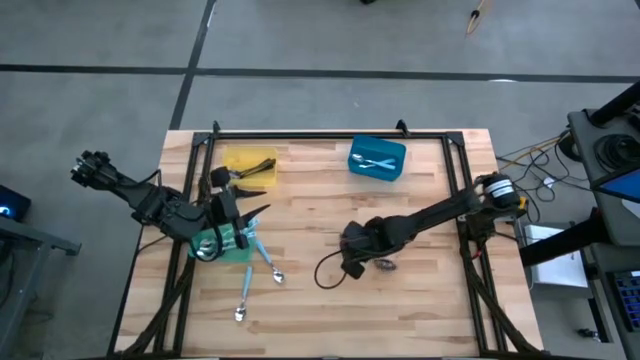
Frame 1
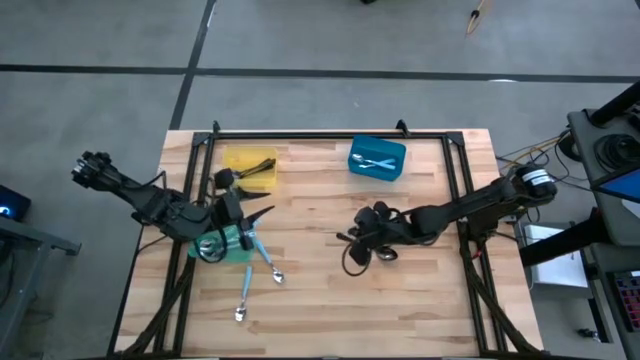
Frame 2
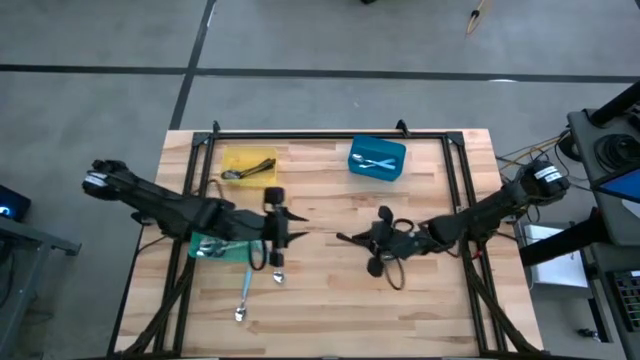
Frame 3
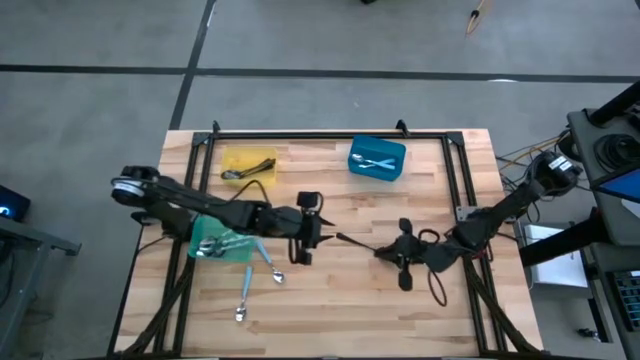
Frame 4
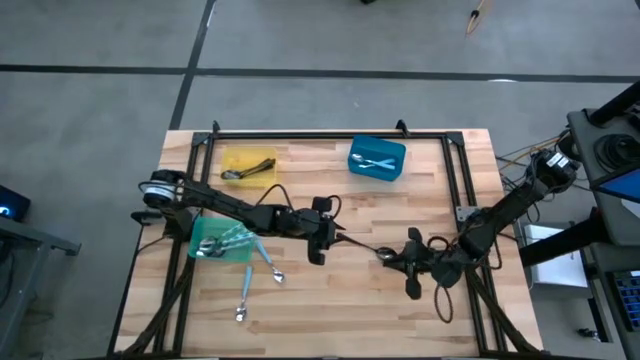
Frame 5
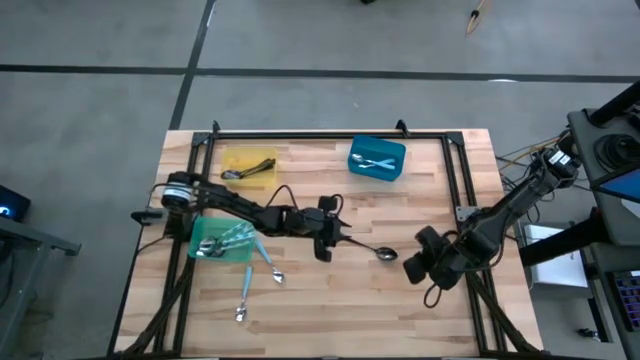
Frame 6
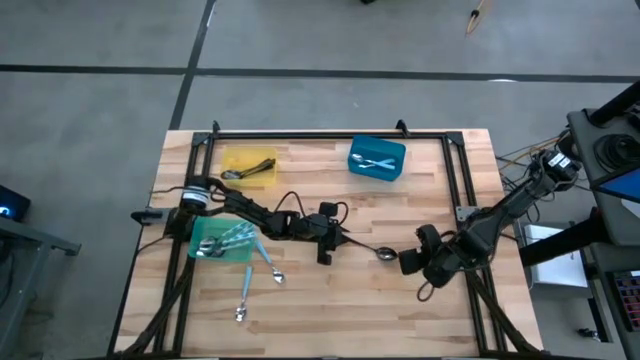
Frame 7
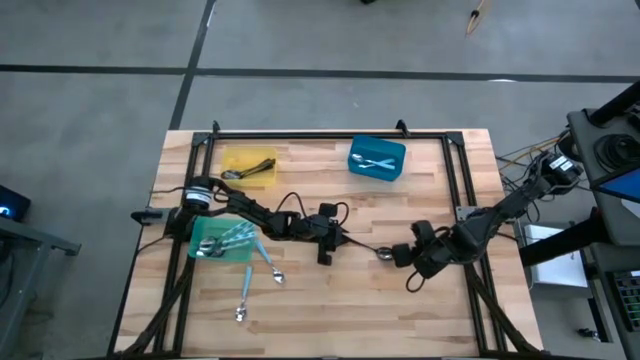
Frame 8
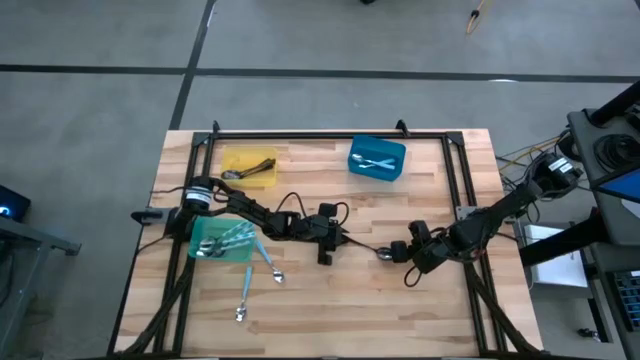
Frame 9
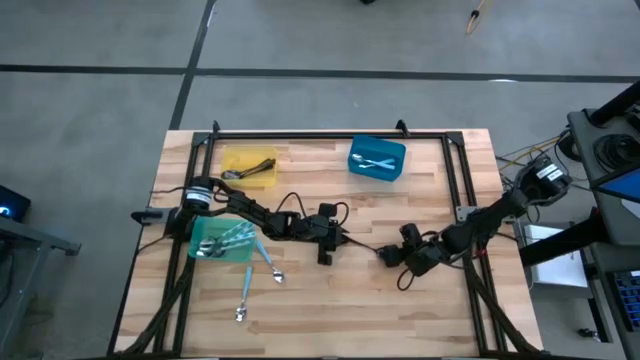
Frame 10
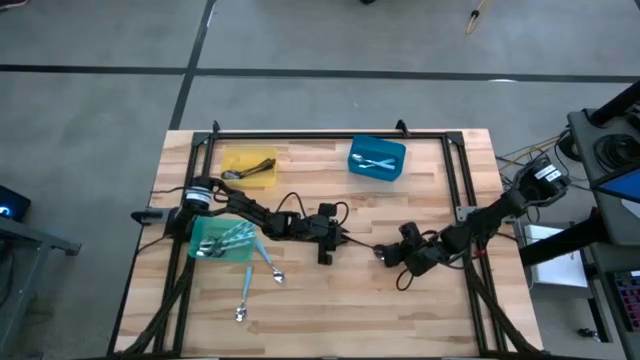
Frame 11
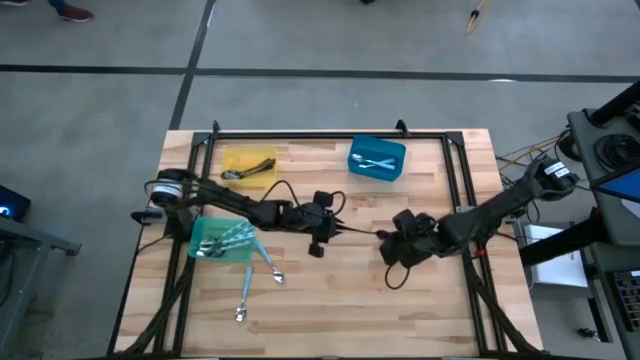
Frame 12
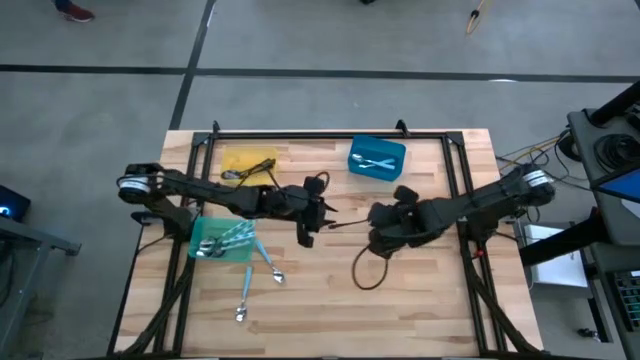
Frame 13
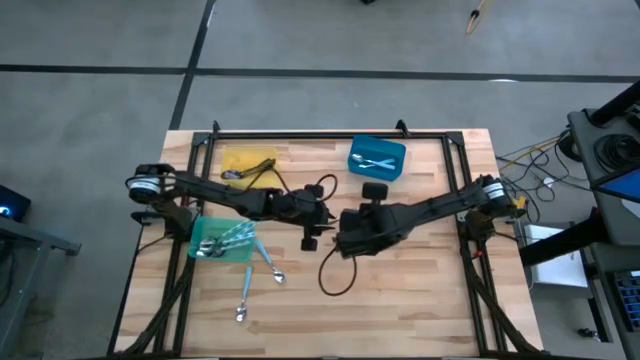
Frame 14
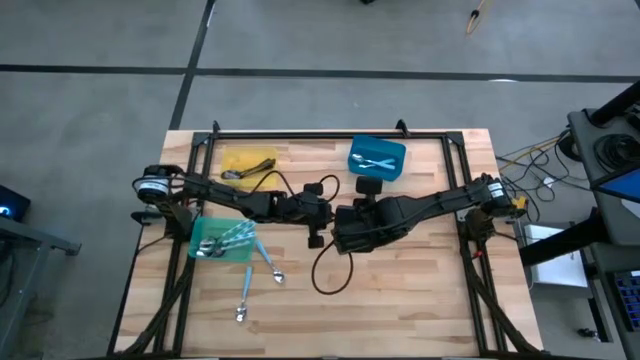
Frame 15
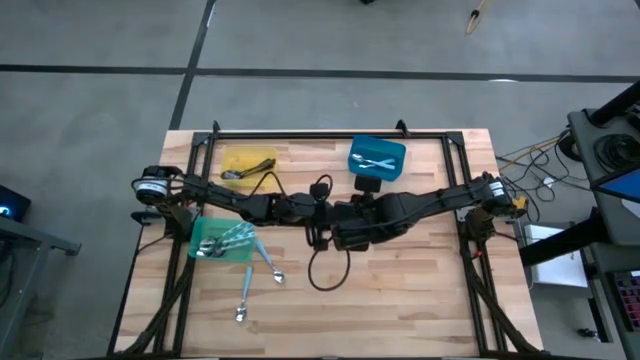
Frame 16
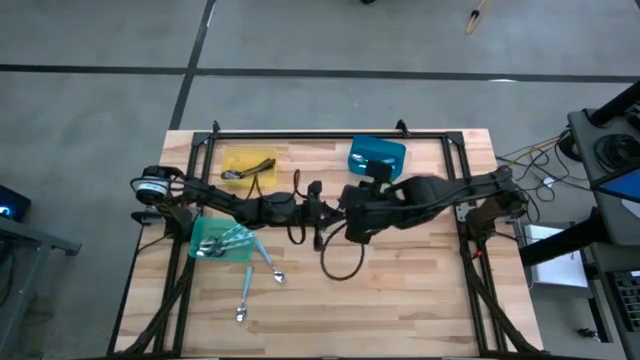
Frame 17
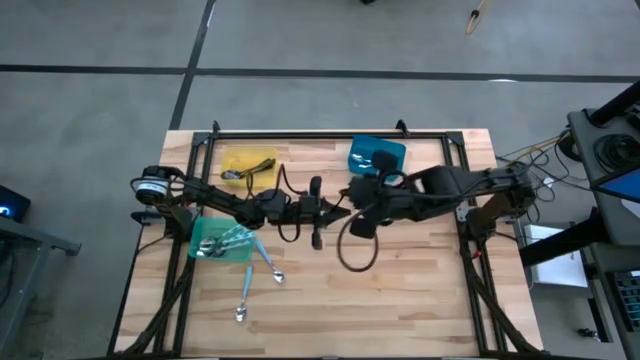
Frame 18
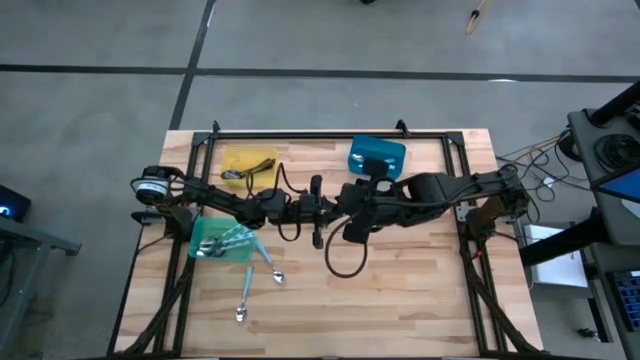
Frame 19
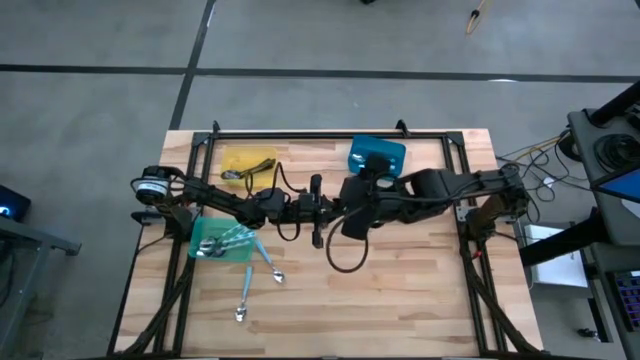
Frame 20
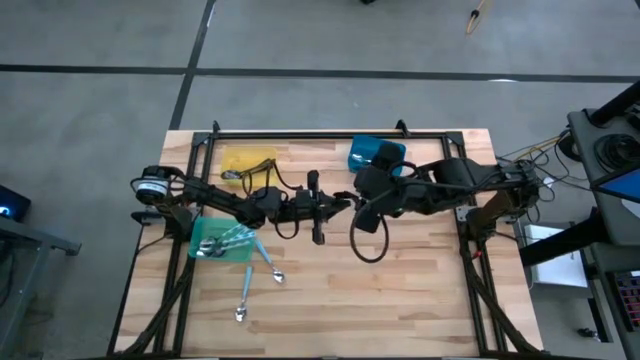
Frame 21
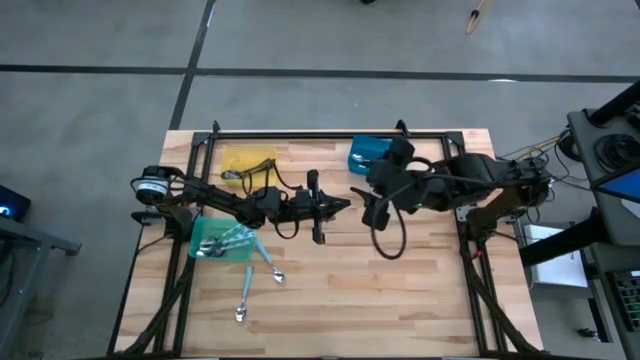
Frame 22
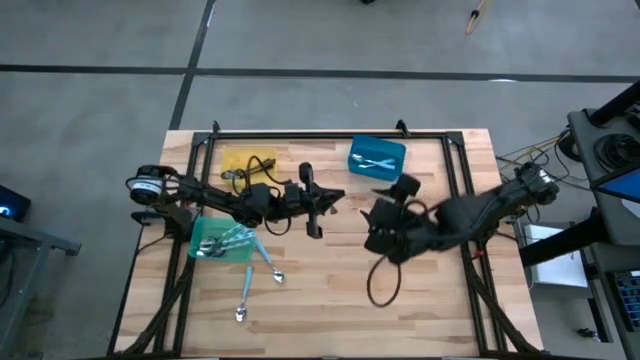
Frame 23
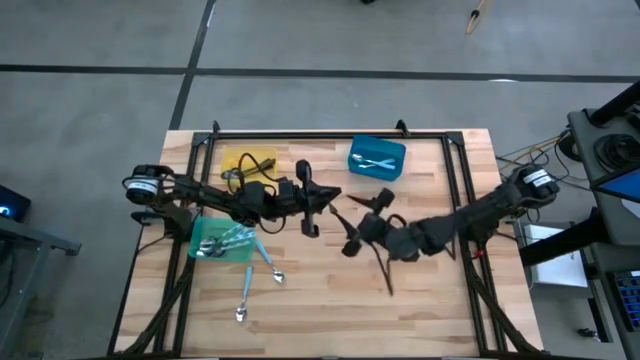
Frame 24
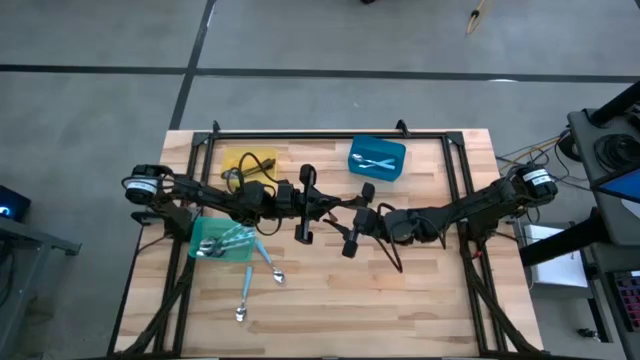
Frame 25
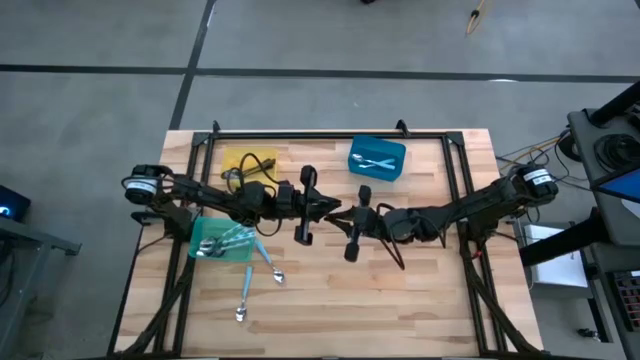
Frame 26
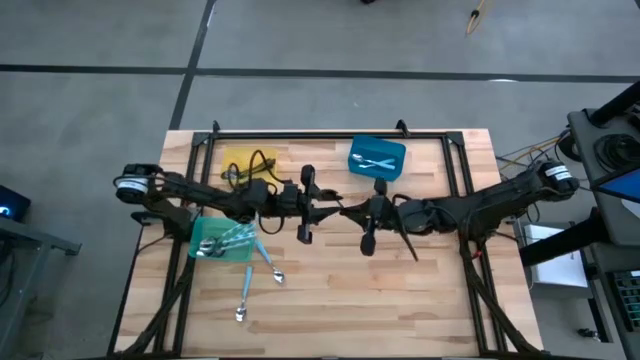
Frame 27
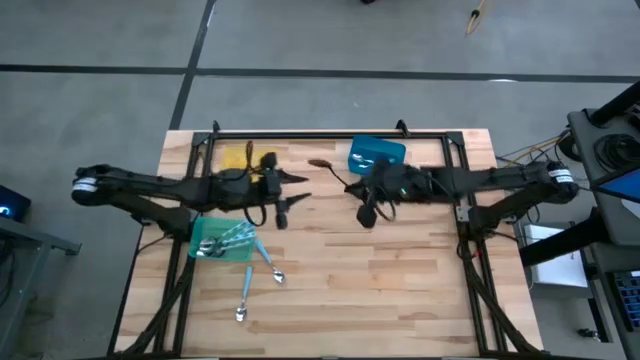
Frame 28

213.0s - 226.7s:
Task: Sort silverware by color (type)
Put the black spoon into the yellow bin

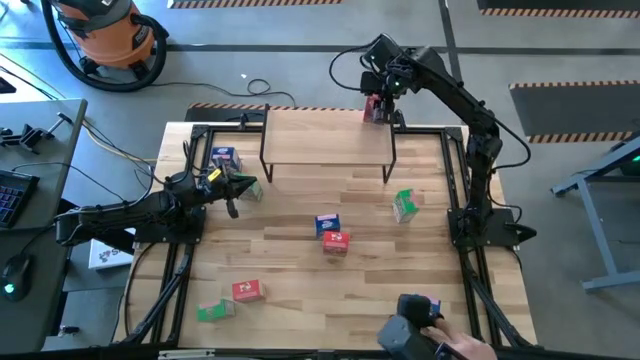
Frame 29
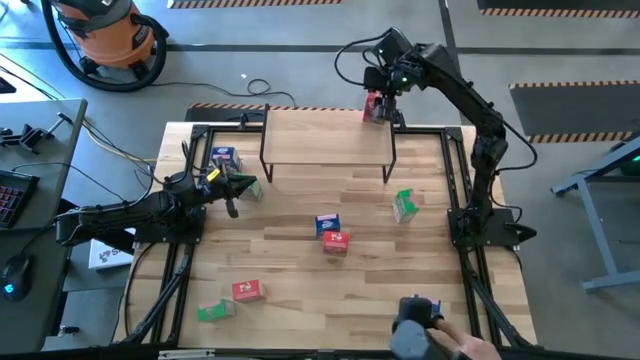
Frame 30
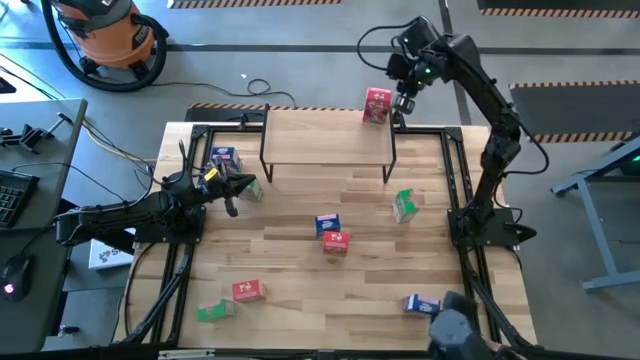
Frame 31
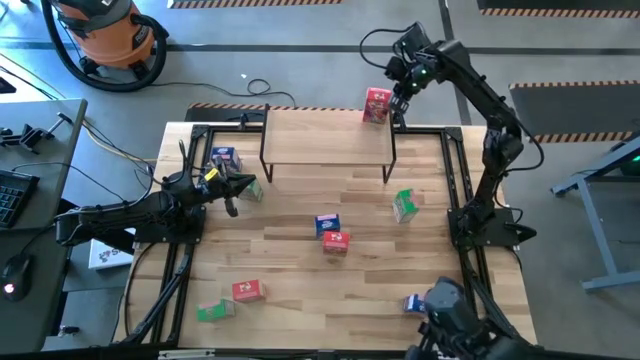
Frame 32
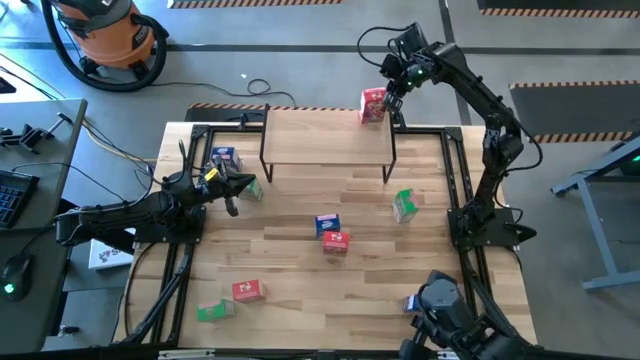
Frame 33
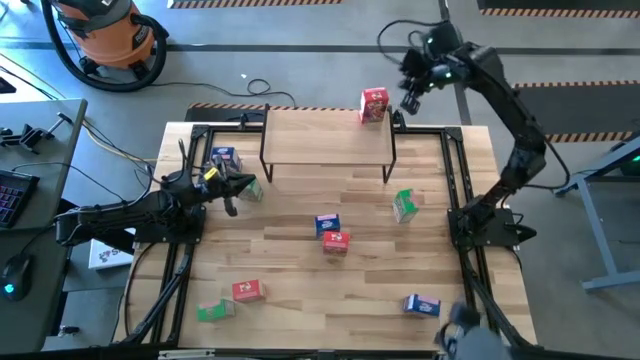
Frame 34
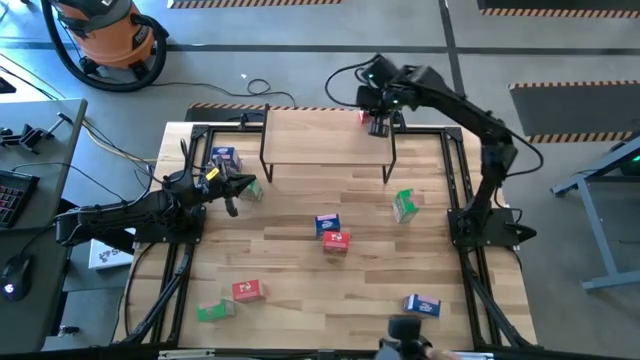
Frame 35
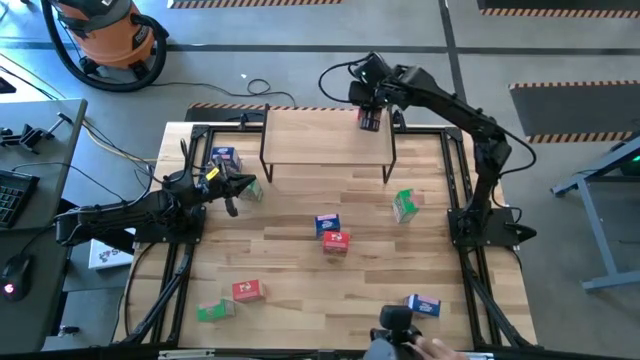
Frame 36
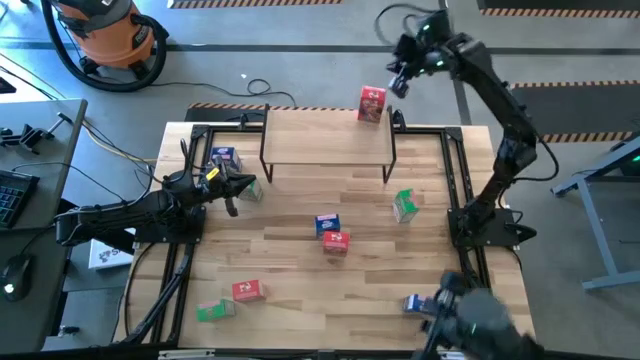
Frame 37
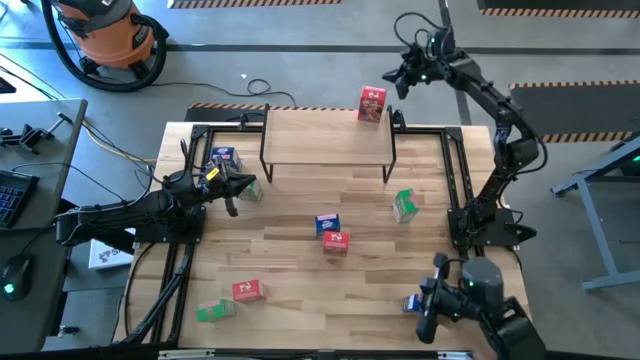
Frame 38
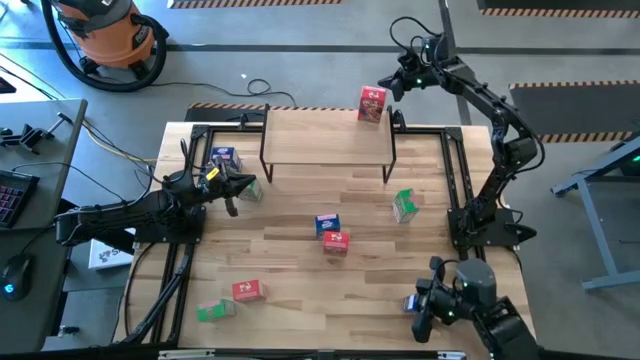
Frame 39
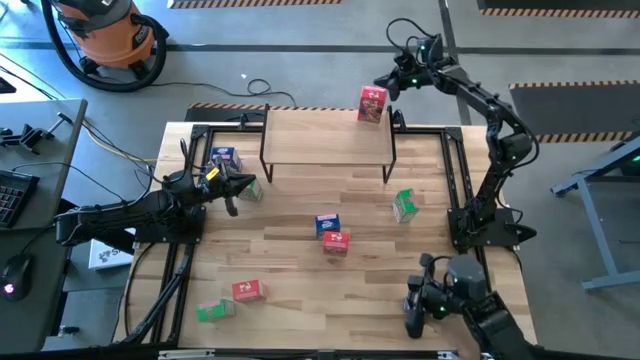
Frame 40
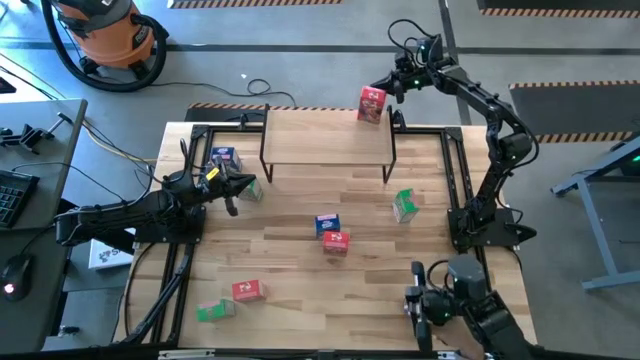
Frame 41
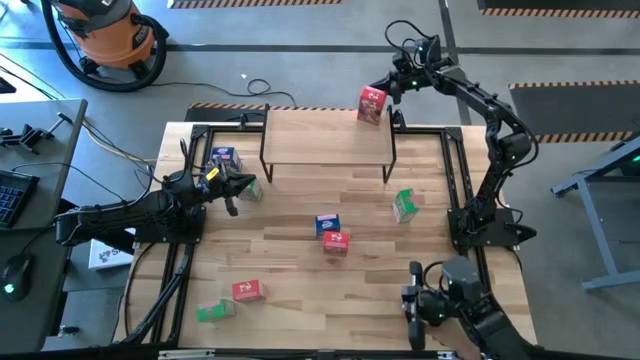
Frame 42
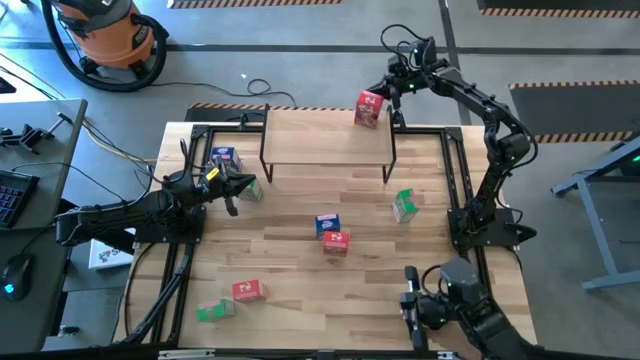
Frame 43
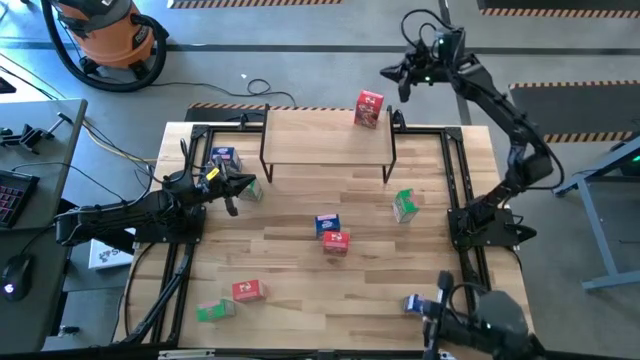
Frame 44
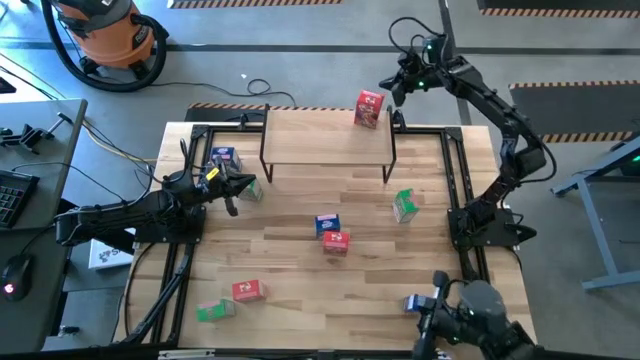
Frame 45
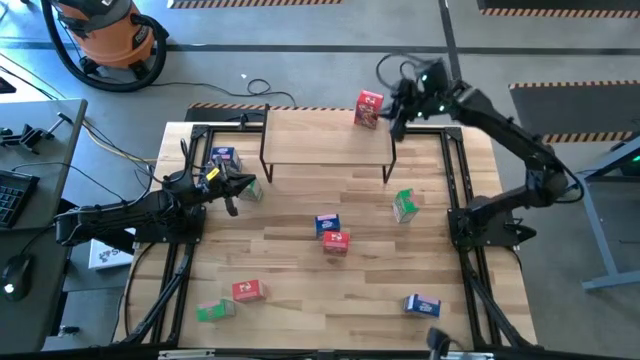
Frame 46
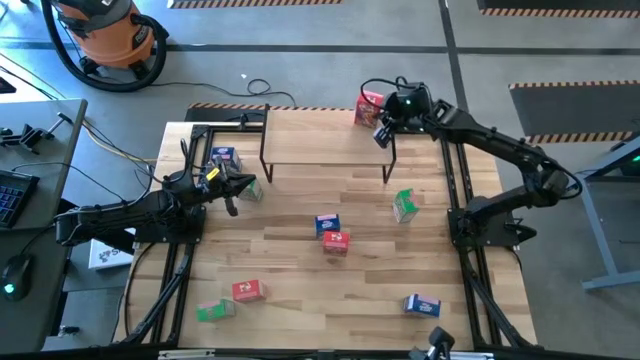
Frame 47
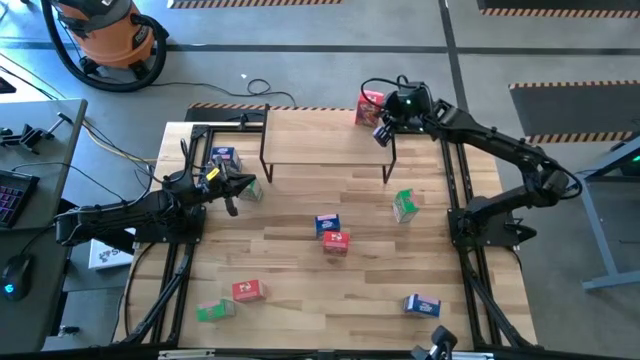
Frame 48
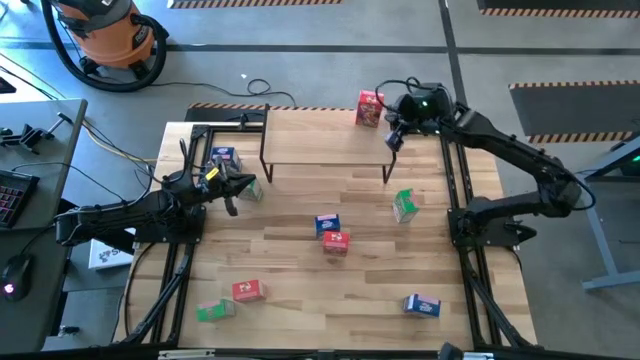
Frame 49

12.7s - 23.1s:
Task: Stack cereal on shelf
Adjust the red cereal box on the shelf
